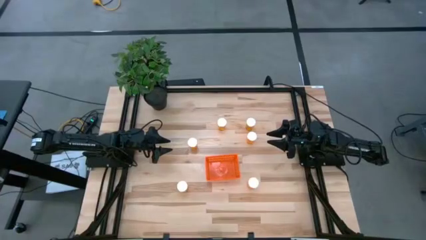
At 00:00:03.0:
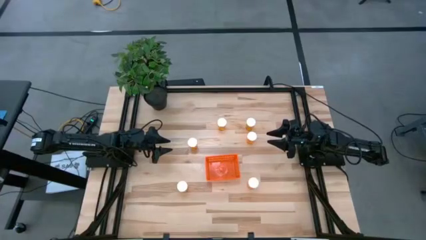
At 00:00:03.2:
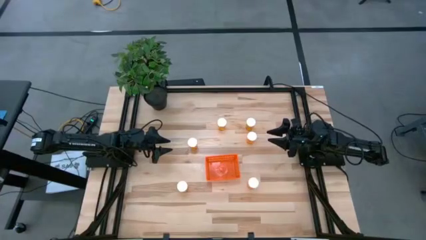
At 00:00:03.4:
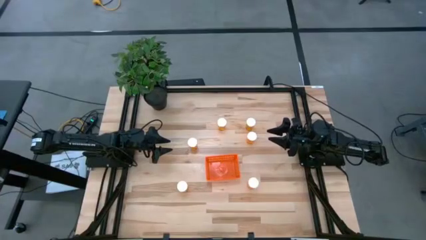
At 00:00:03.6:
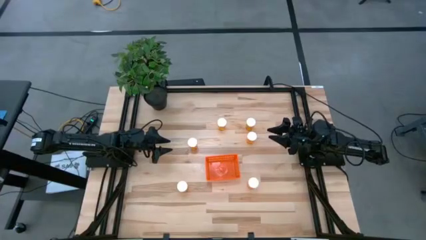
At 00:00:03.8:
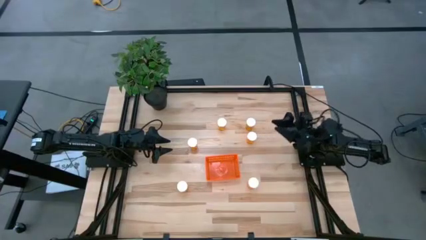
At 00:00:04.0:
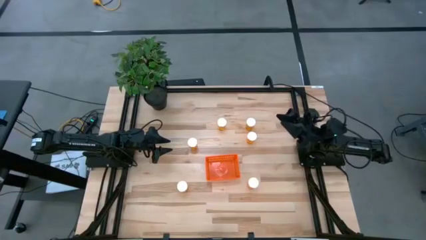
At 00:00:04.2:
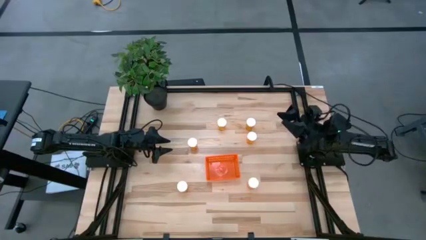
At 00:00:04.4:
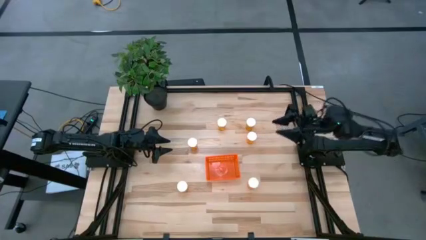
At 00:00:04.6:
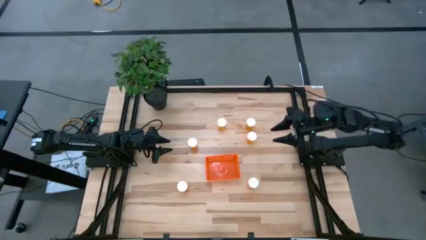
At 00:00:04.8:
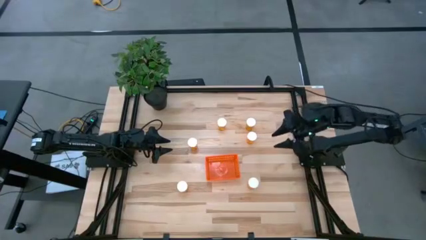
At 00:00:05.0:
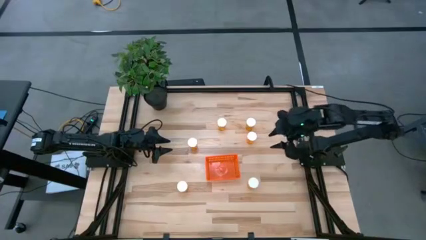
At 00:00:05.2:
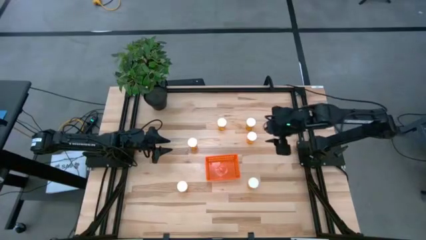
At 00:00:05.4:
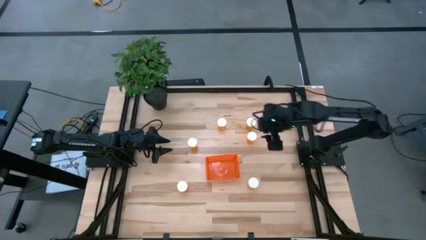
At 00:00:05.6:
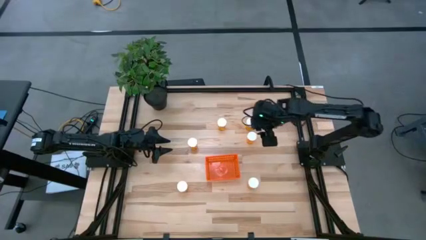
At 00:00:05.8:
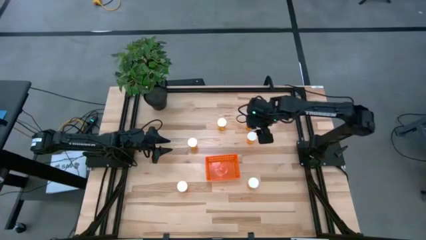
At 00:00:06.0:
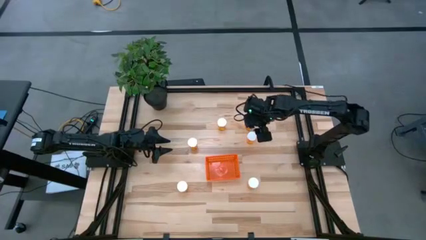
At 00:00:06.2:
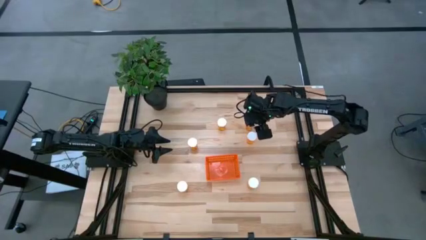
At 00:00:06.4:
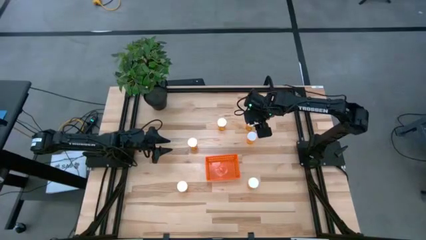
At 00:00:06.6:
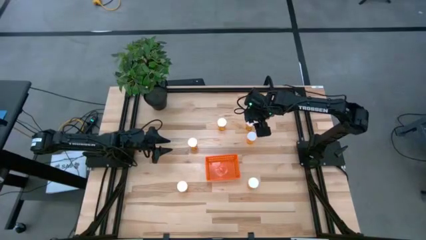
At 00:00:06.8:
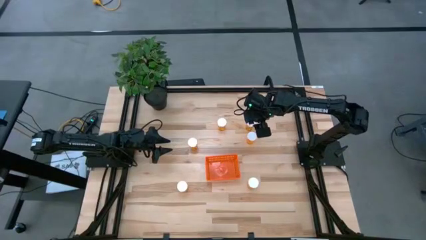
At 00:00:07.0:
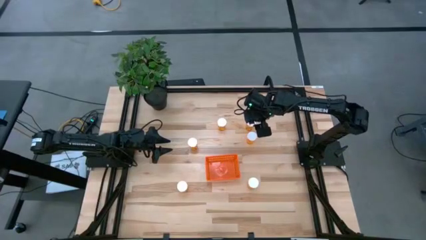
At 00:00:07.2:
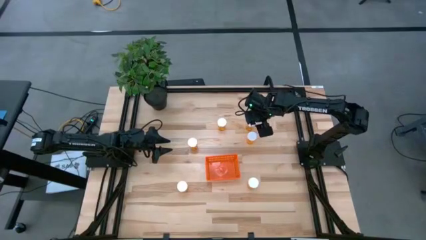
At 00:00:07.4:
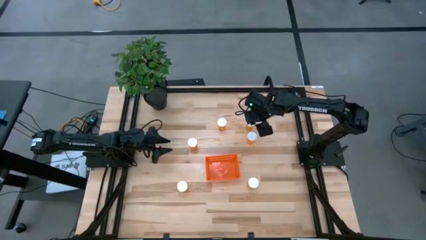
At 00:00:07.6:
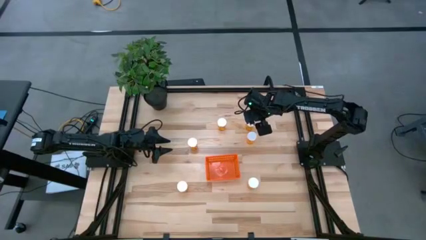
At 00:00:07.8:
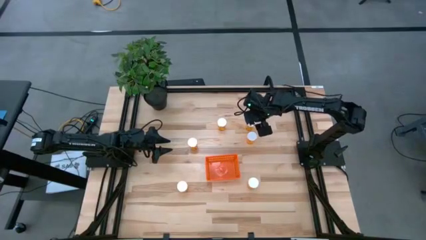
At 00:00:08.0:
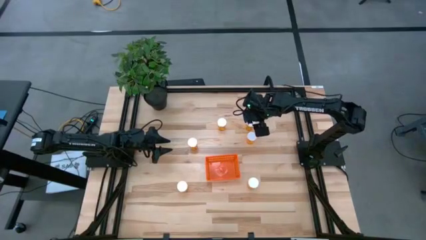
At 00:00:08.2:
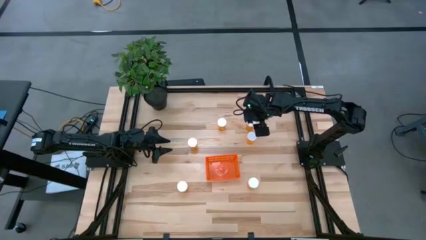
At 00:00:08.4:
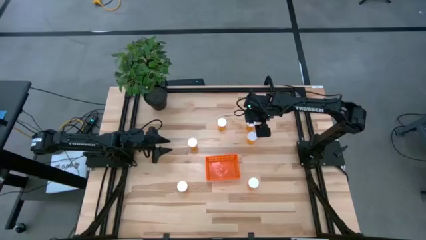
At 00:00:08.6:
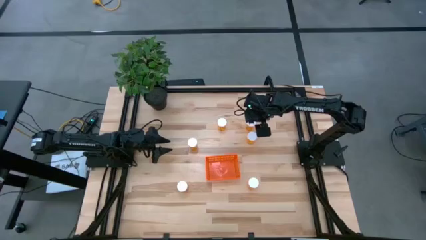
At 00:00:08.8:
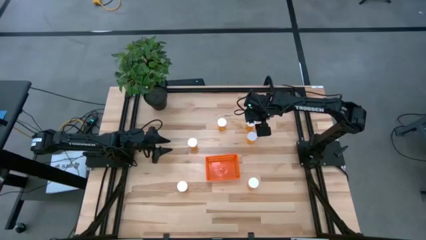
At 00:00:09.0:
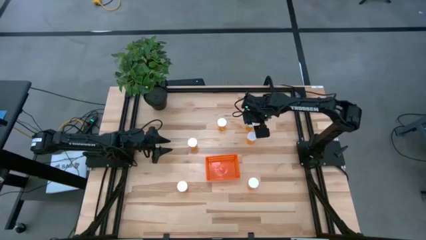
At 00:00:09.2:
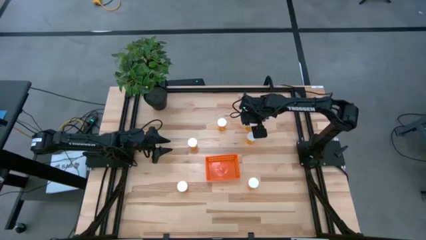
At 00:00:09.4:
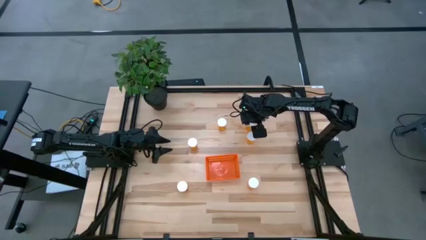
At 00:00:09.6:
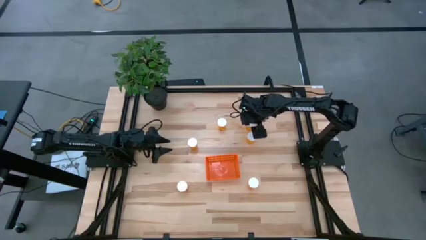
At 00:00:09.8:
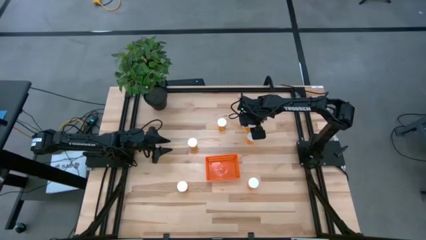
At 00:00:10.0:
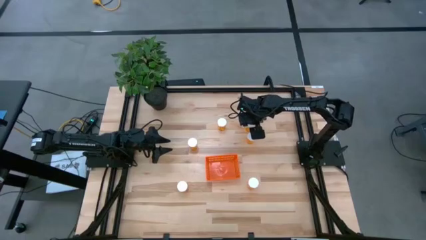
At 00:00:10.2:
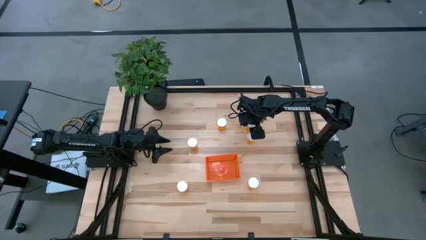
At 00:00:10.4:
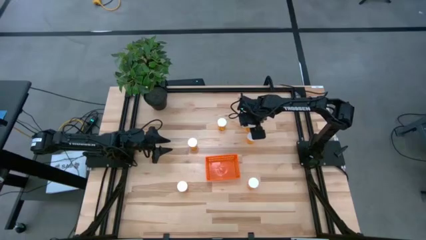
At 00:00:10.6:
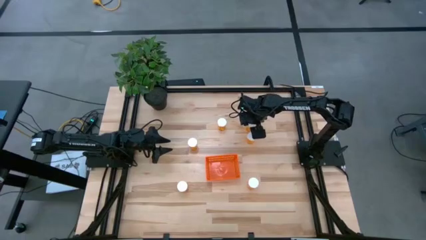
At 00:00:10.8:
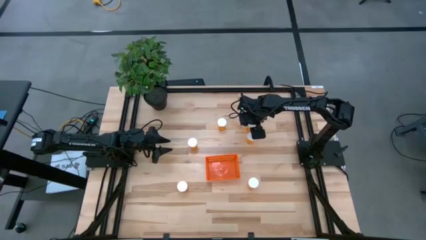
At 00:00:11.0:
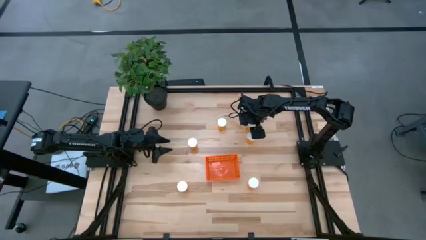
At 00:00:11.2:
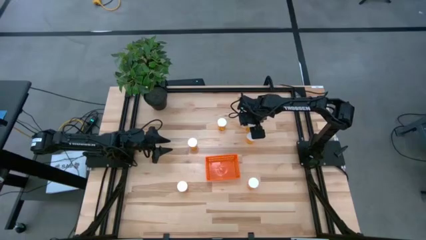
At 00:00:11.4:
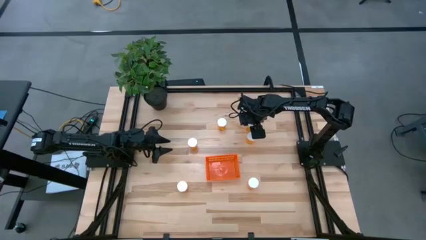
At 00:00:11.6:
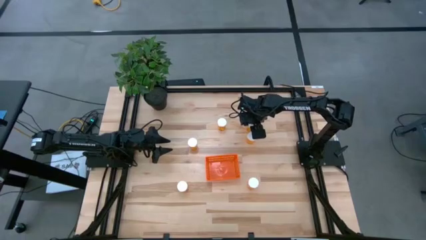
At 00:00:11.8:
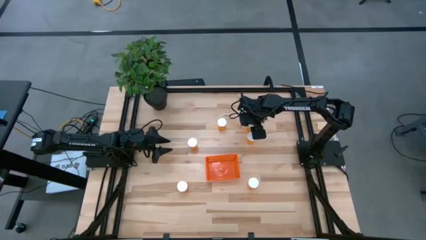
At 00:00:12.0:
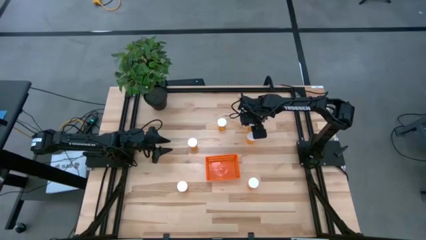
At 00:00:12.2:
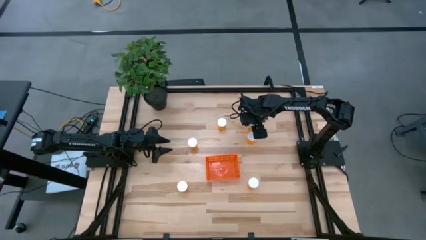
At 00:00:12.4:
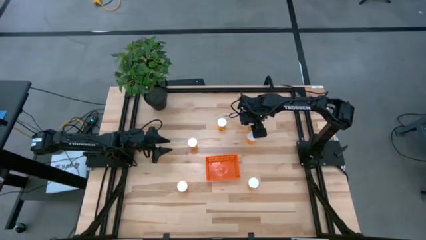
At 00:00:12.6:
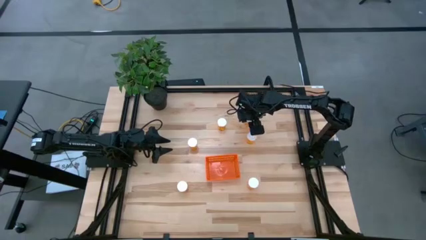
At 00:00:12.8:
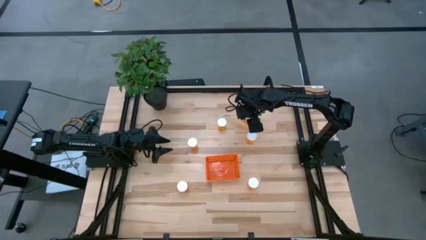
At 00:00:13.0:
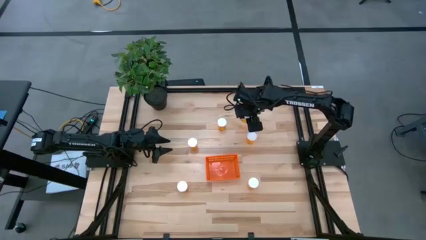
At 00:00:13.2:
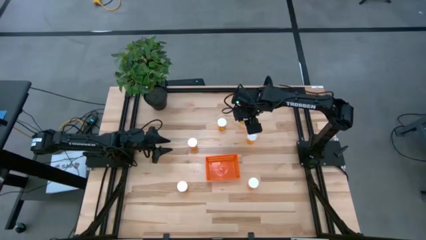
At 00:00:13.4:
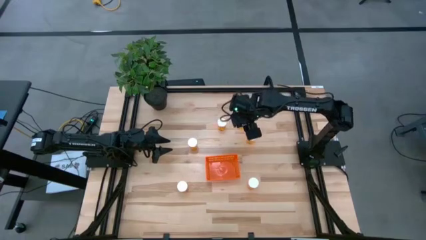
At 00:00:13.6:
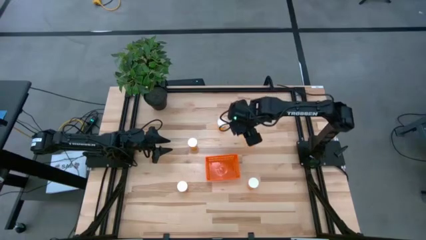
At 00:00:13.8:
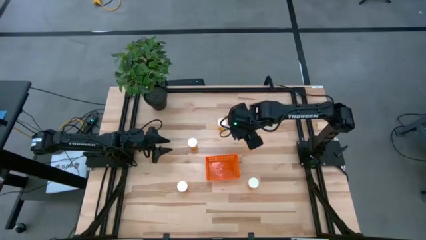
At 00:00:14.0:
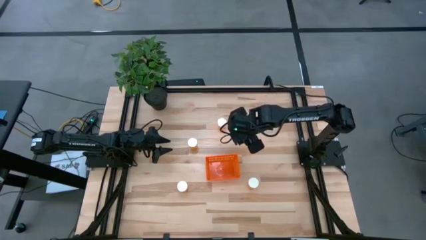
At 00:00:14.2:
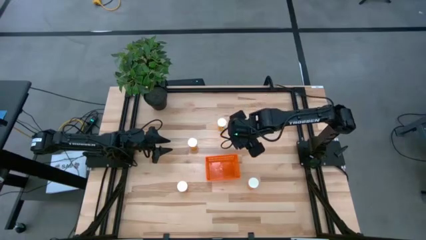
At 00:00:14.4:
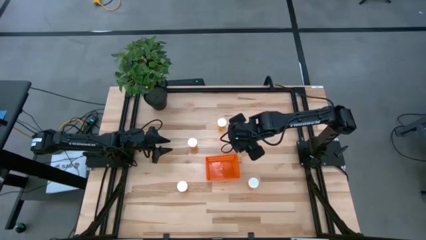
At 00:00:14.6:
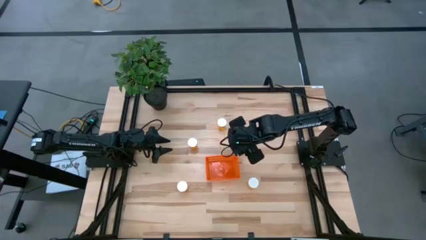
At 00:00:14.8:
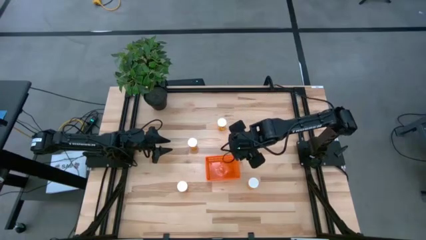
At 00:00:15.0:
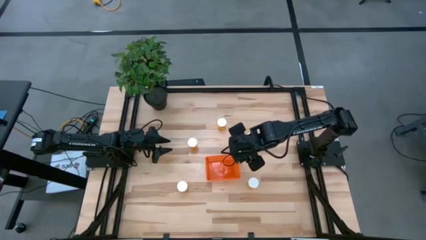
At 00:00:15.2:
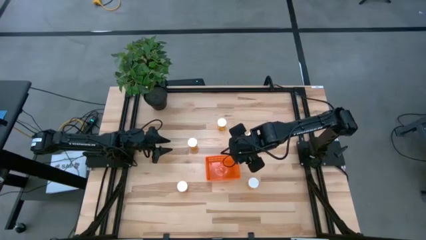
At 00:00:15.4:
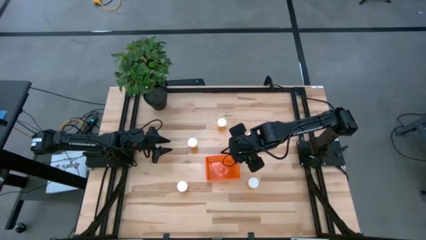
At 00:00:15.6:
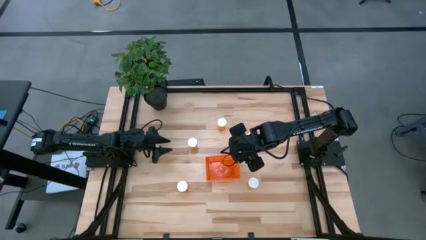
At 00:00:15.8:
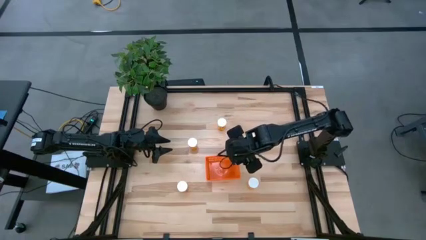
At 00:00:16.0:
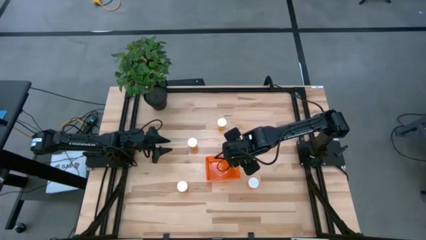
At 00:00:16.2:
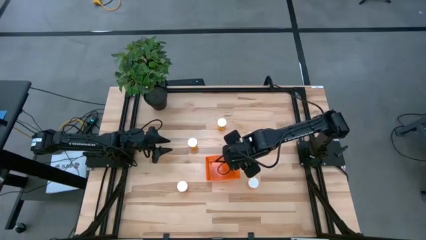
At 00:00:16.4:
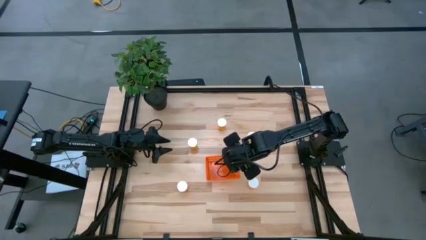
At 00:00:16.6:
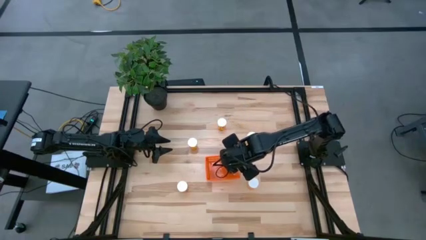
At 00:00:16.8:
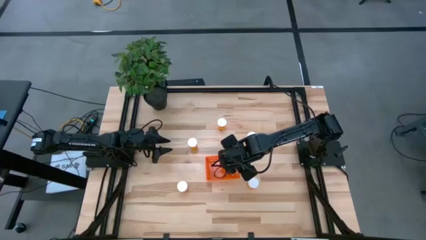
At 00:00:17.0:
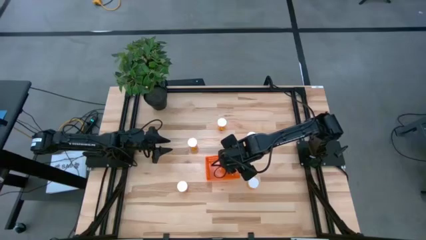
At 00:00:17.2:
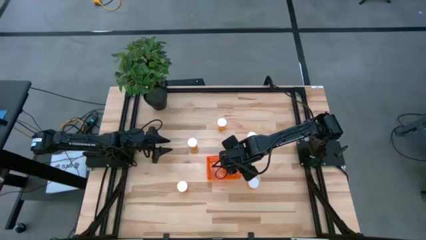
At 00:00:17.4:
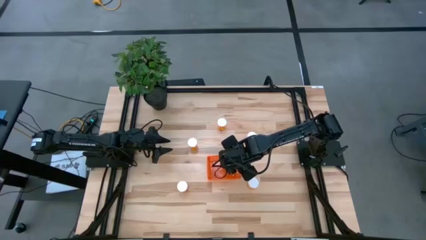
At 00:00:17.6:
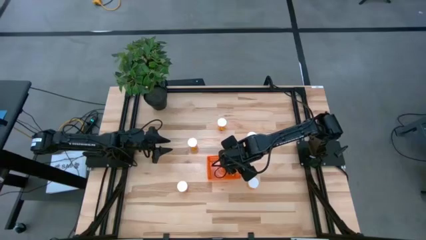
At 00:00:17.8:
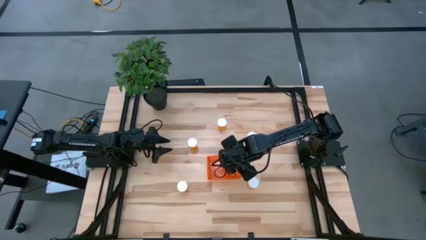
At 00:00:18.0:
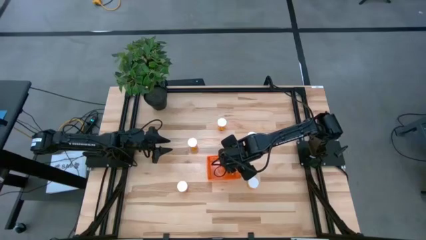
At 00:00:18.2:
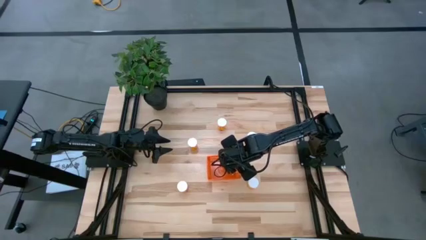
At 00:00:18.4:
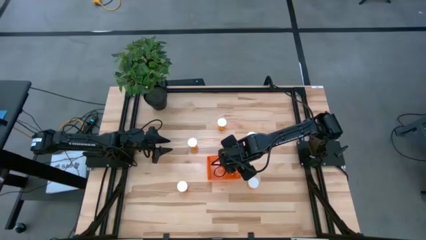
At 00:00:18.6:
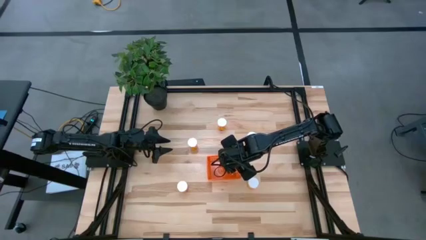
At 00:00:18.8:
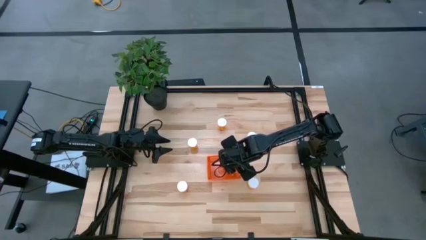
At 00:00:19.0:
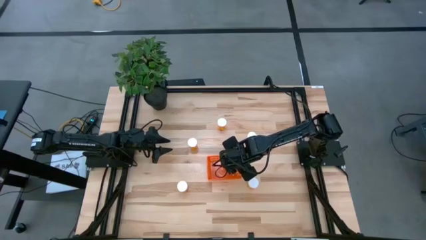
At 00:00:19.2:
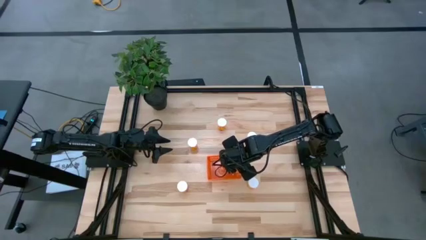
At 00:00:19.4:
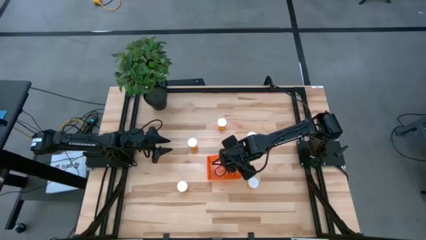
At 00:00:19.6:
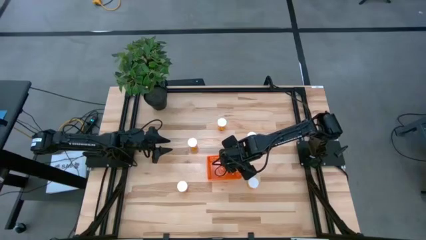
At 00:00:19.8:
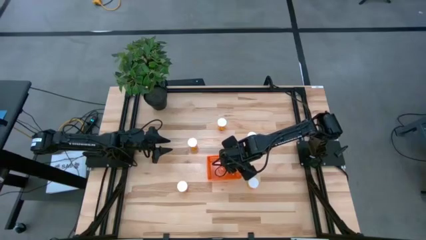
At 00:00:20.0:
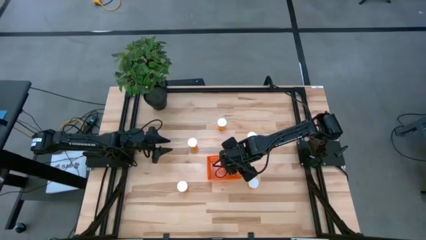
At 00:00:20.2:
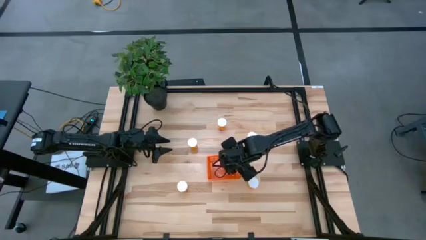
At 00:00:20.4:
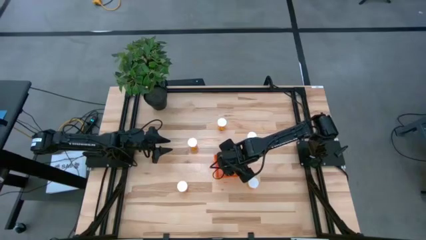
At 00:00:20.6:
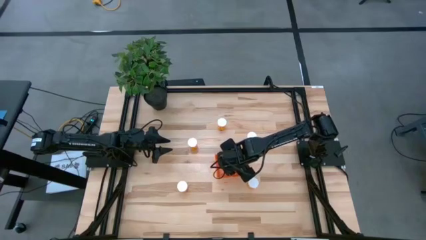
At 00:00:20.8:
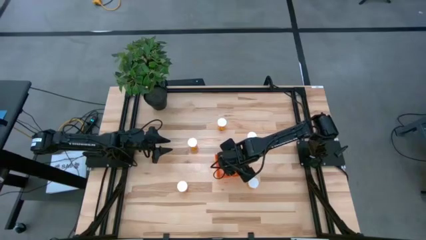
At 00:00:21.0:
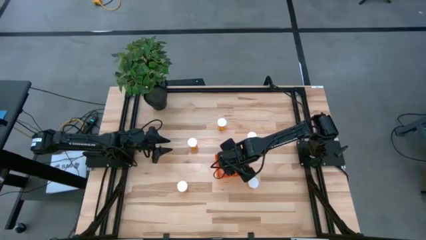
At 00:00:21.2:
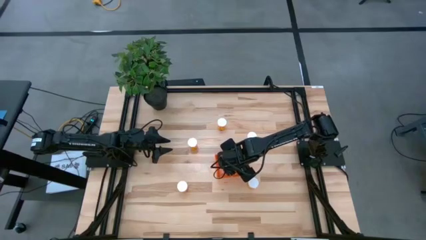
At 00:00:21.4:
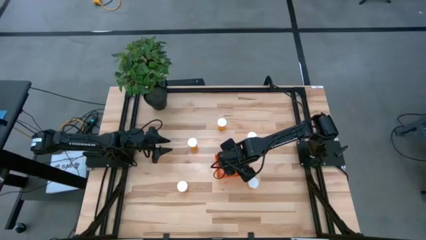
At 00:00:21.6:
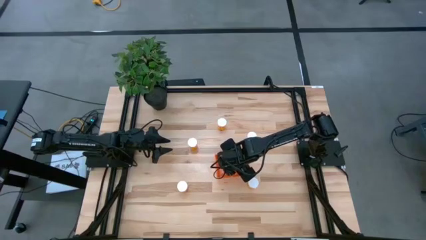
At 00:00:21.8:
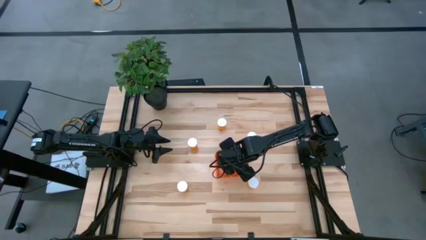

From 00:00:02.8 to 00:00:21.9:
Task: Pick and place pill bottles into a basket
Put the orange pill bottle into the orange bin
